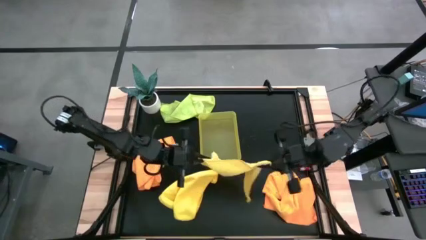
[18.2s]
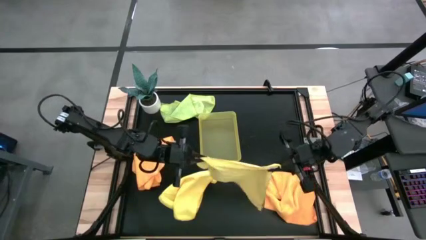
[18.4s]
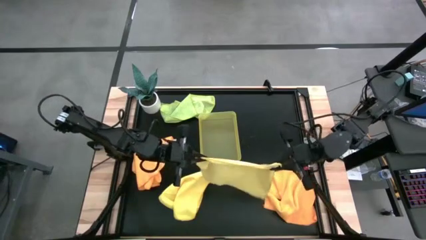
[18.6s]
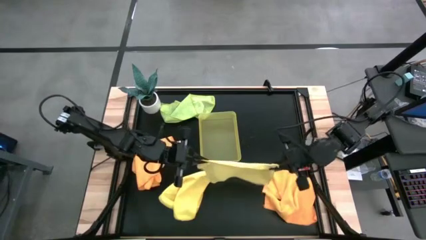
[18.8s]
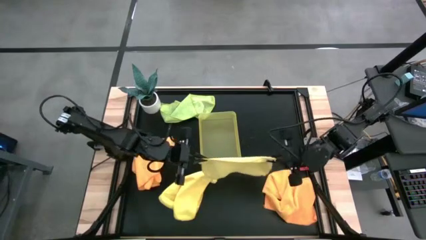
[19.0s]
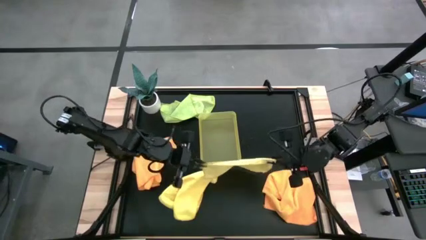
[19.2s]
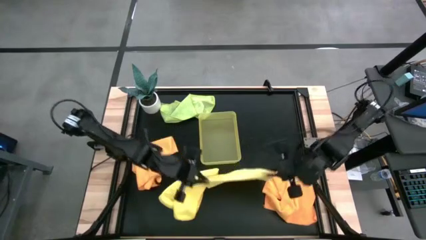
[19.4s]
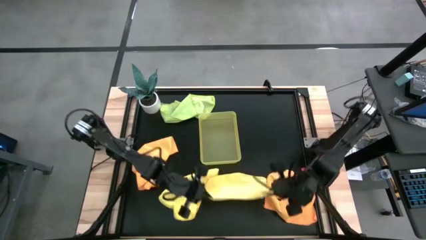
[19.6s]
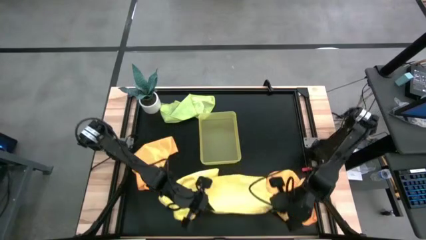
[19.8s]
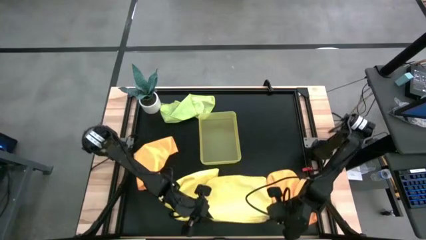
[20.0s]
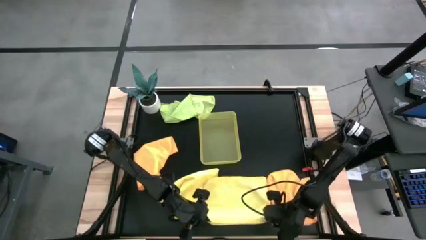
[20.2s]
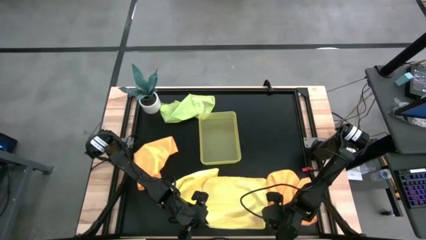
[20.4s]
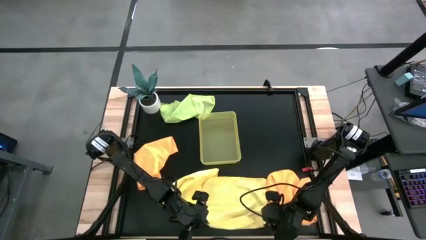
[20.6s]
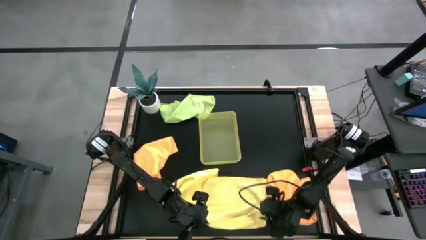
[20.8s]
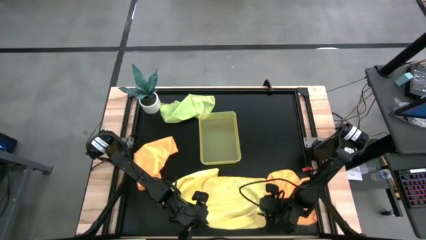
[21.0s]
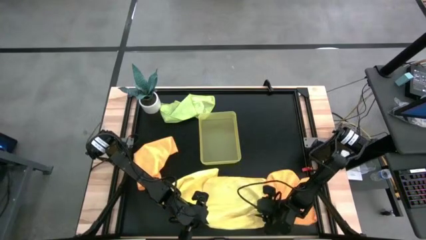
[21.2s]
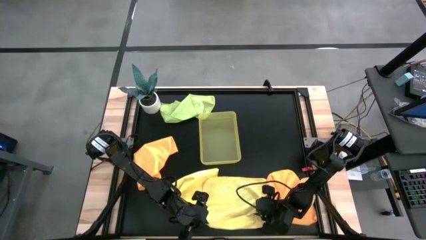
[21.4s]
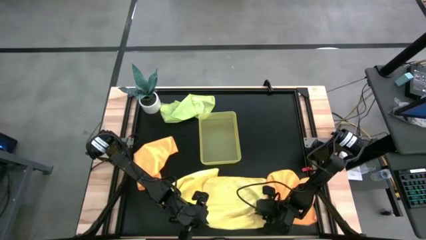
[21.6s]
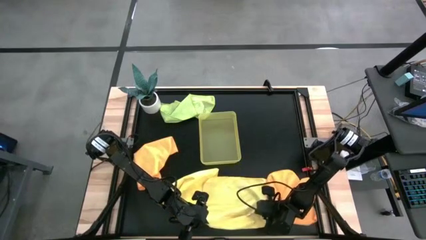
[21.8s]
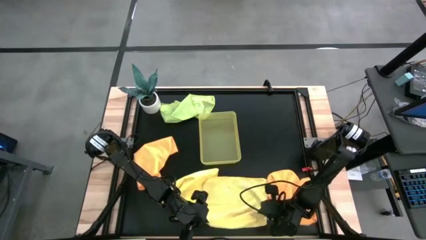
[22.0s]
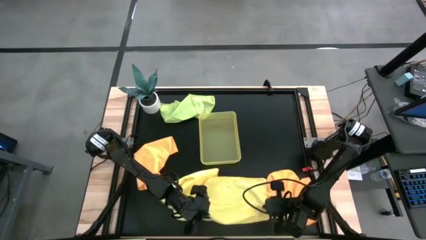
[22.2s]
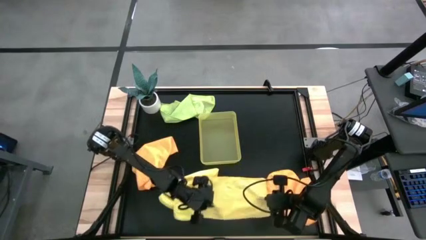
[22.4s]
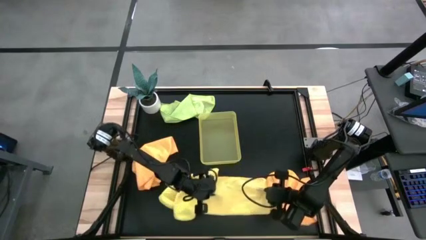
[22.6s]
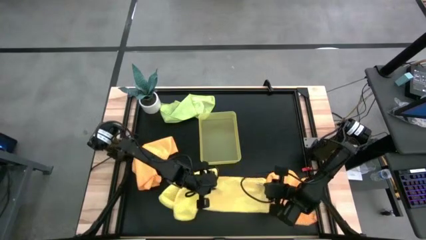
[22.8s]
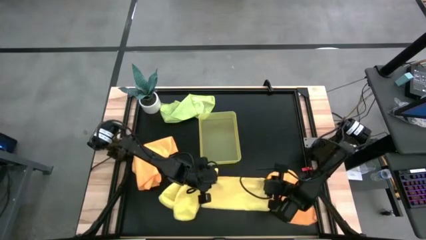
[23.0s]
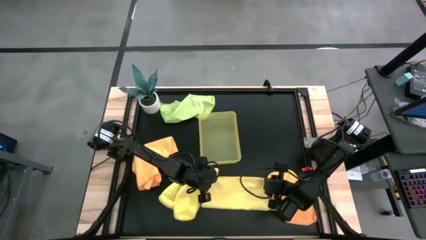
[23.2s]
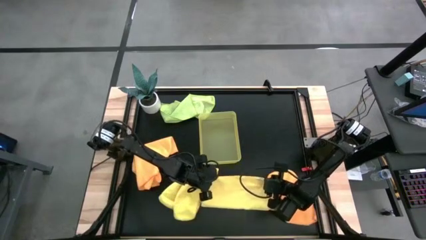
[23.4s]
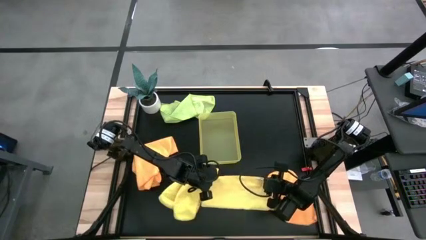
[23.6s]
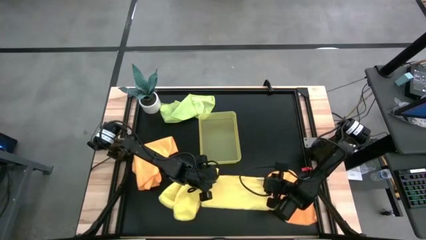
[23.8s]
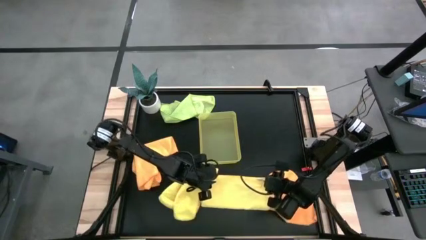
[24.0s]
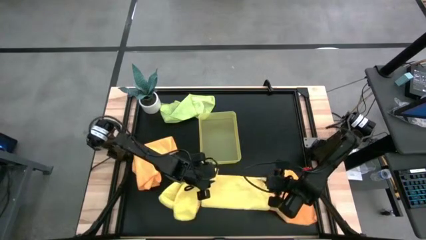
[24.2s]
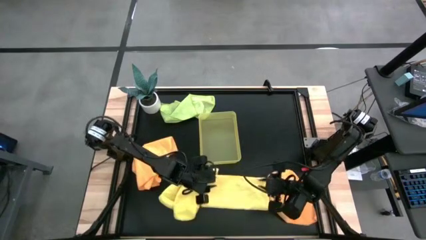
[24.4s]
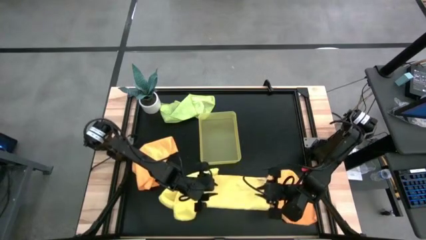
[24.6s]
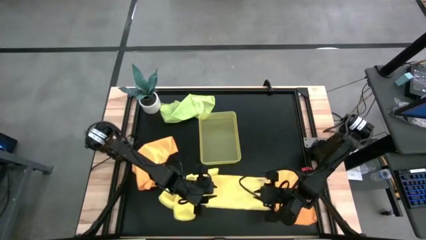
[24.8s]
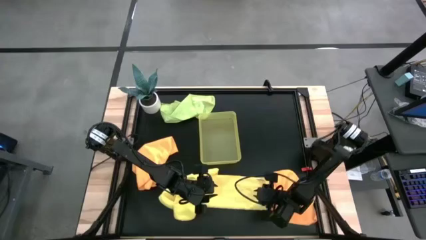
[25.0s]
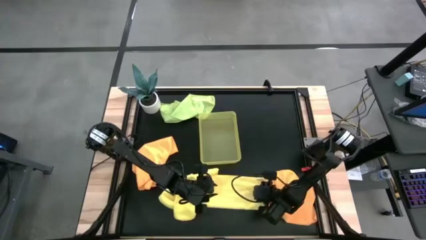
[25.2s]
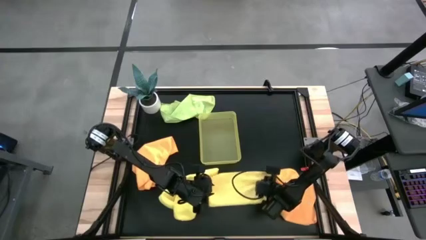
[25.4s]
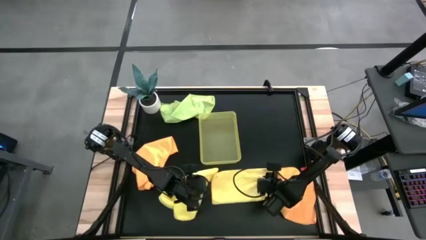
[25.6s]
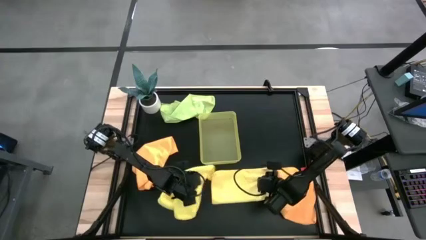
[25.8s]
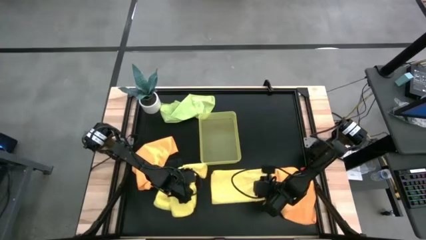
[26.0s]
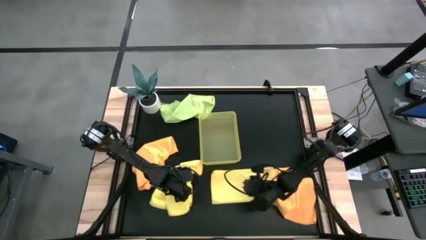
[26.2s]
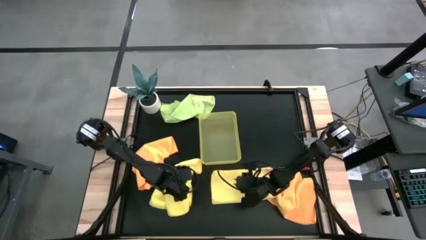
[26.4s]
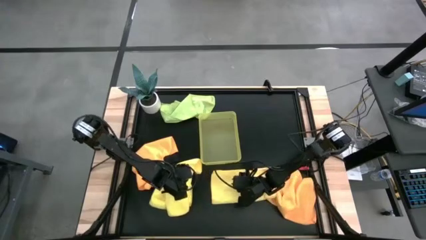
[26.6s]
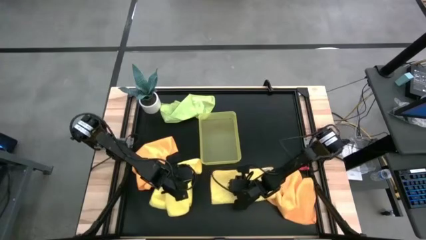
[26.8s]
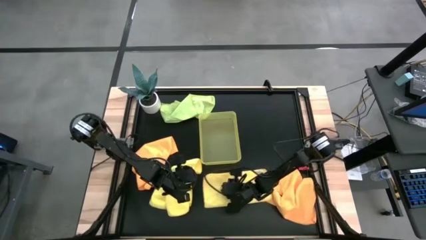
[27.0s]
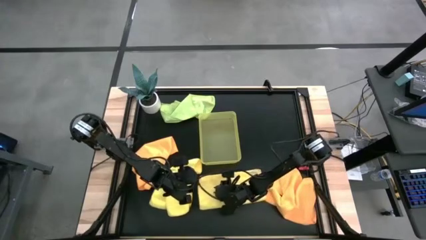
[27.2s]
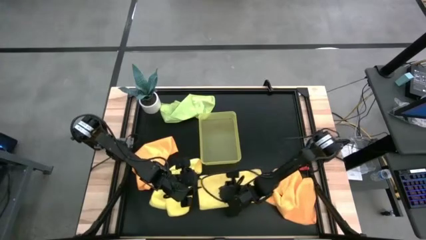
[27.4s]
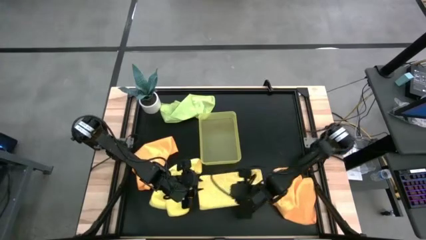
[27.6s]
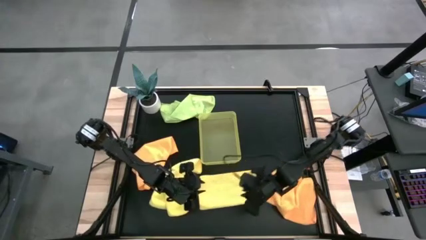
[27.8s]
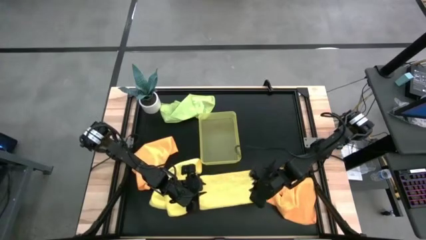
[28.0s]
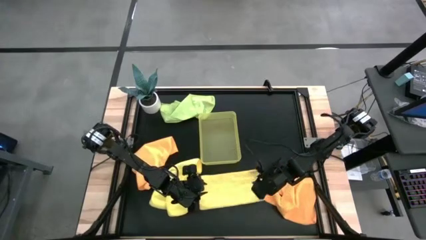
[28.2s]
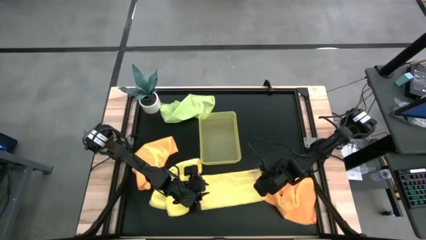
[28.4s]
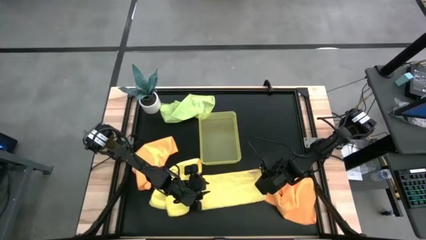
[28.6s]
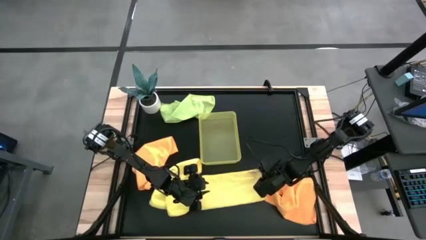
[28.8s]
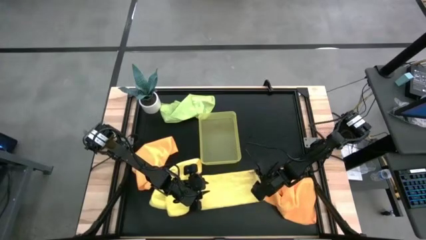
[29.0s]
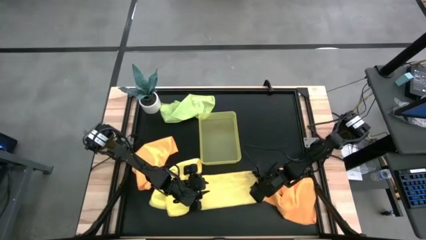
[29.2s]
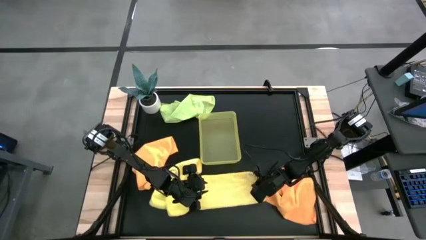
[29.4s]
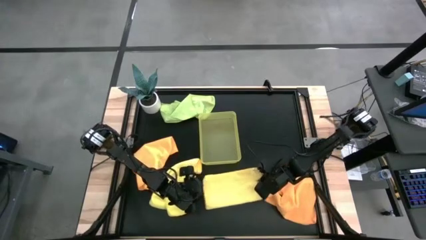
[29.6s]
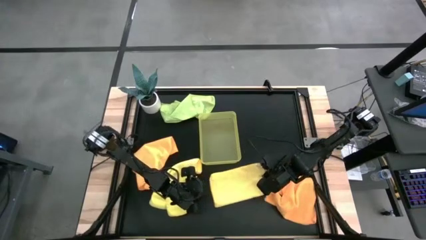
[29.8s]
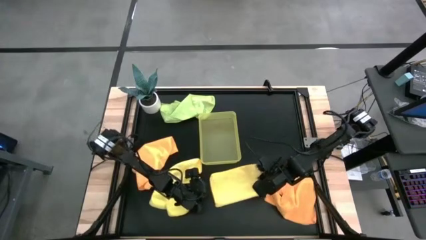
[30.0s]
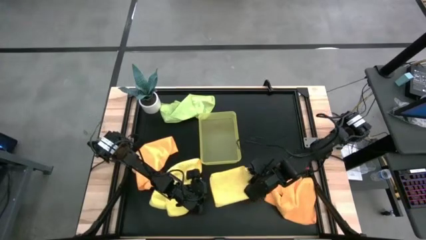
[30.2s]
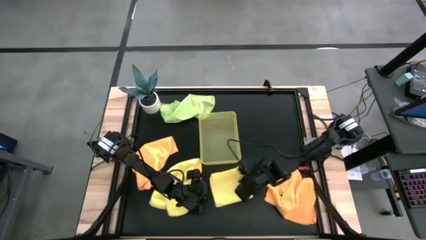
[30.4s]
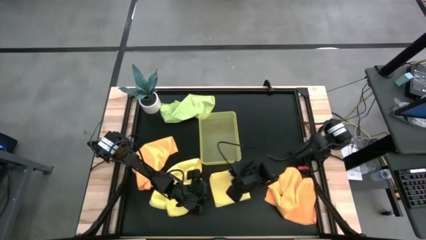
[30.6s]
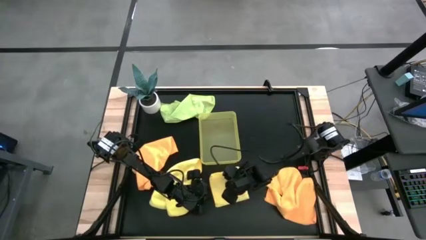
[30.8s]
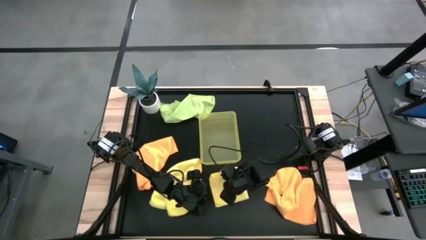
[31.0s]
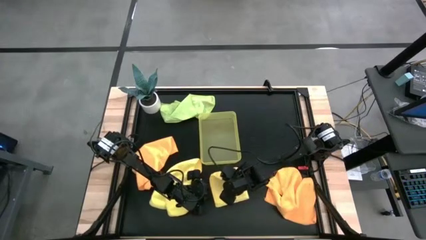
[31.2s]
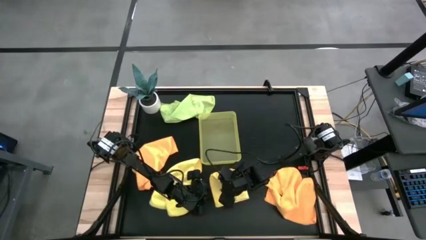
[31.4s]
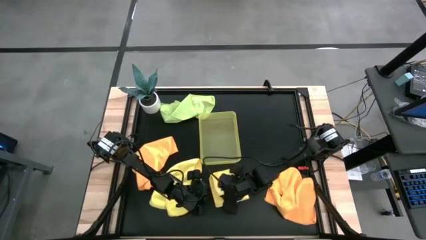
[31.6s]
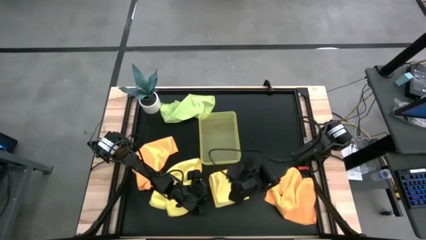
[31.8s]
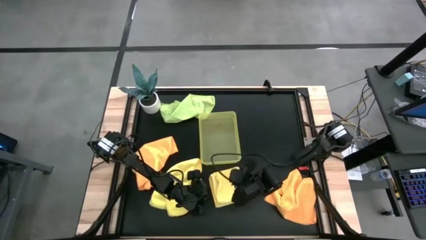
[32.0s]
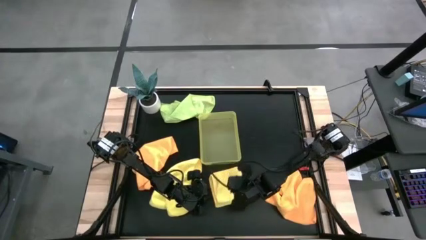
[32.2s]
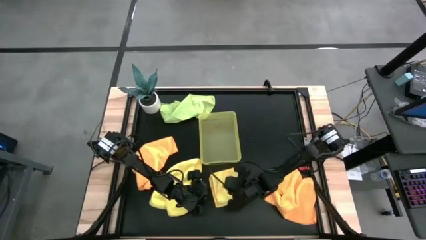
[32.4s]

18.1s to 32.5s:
Task: Fold microfiber towels
Fold the top yellow microfiber cloth
